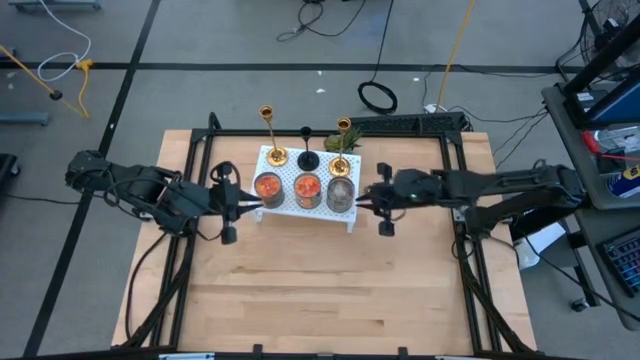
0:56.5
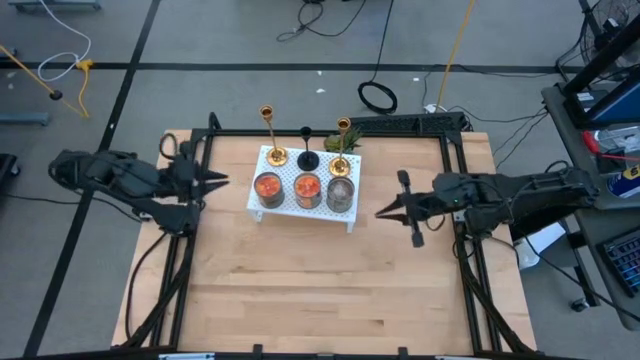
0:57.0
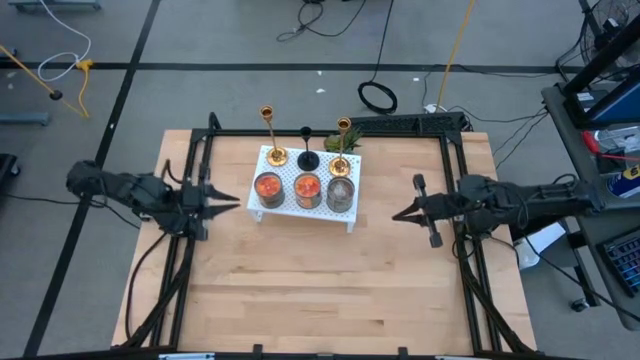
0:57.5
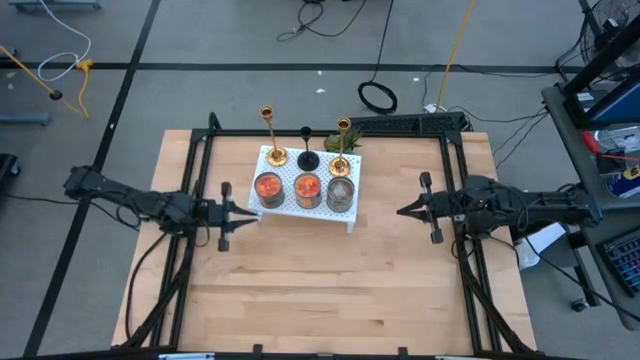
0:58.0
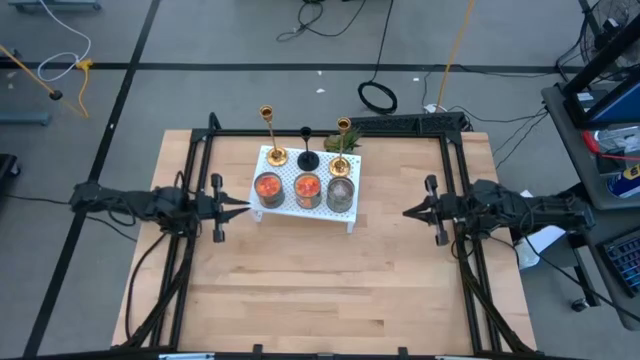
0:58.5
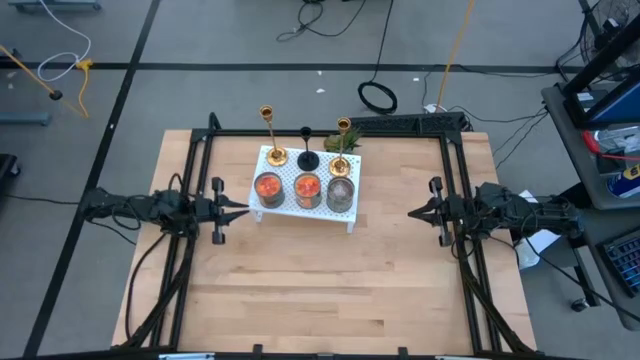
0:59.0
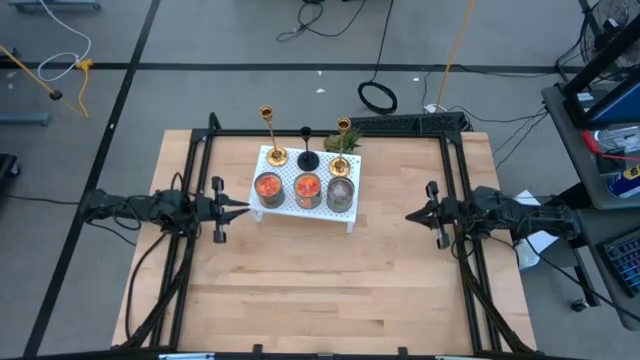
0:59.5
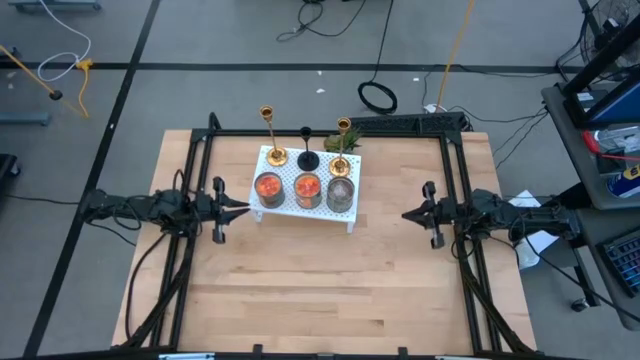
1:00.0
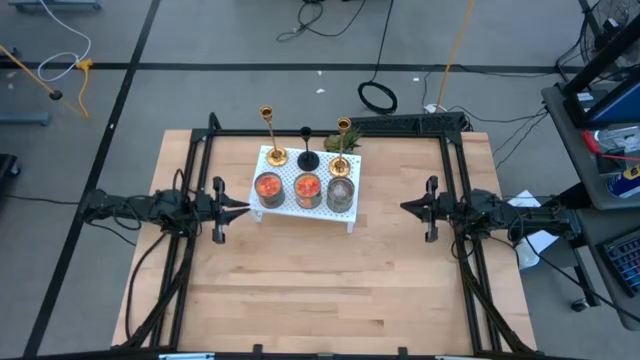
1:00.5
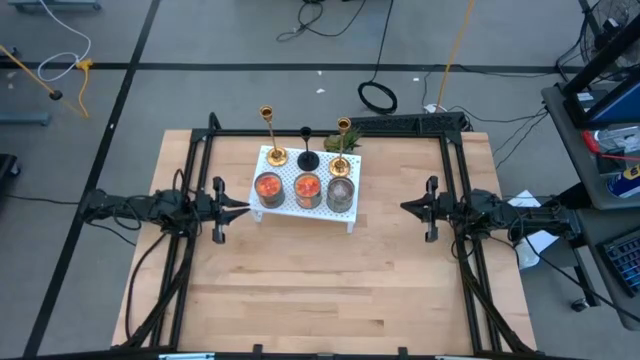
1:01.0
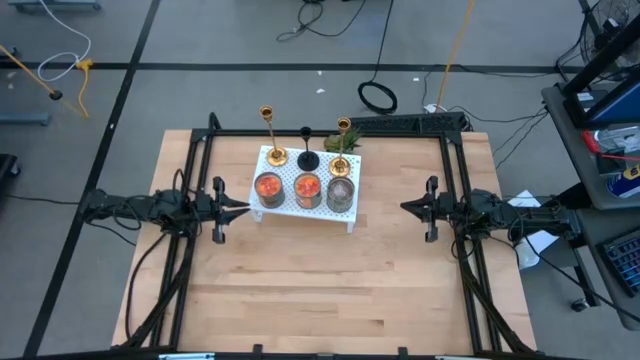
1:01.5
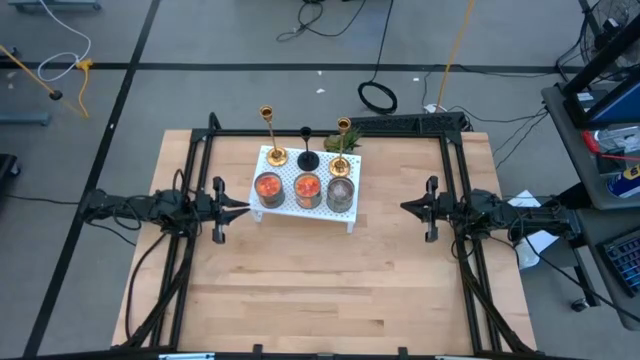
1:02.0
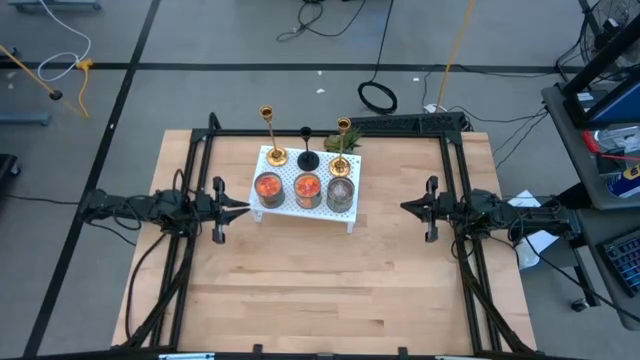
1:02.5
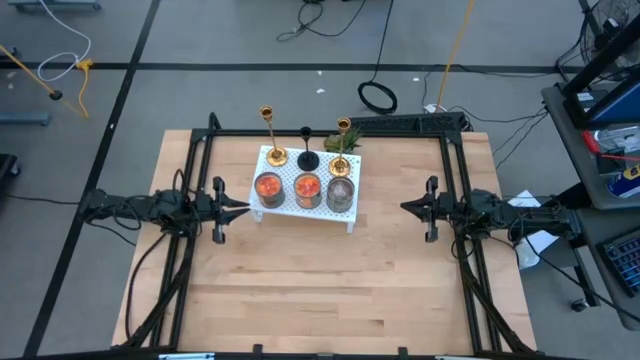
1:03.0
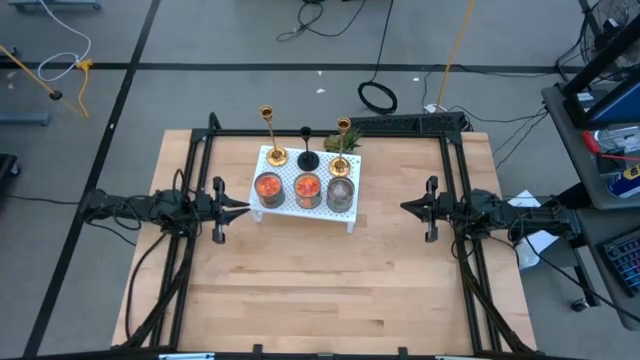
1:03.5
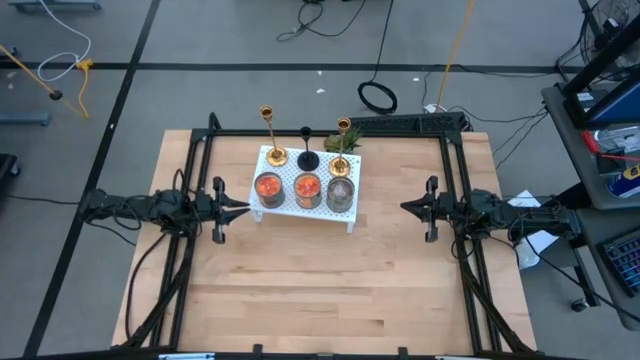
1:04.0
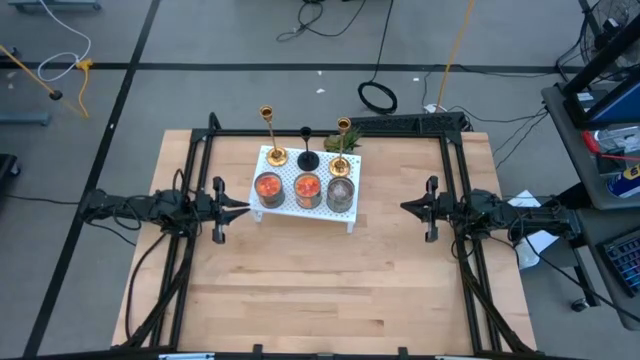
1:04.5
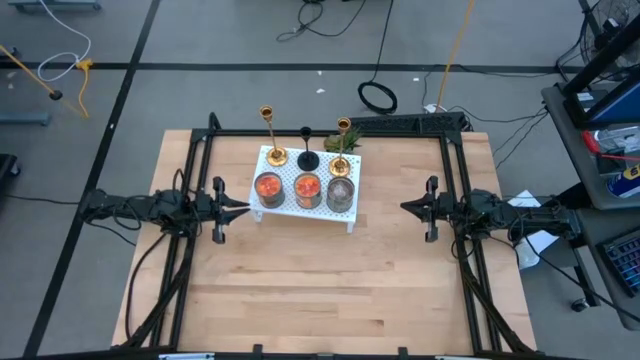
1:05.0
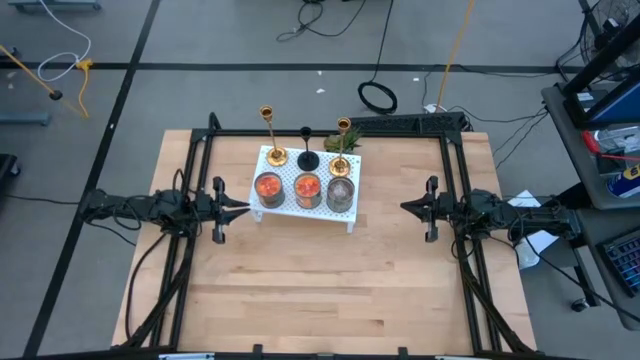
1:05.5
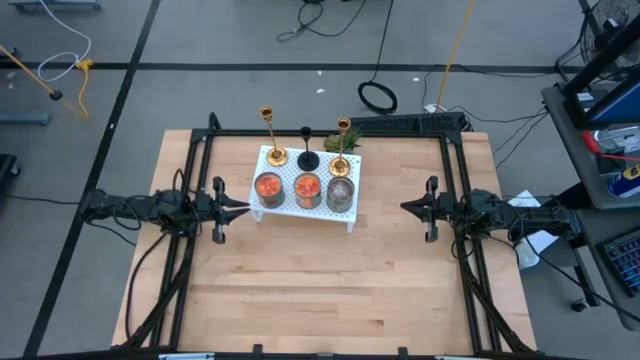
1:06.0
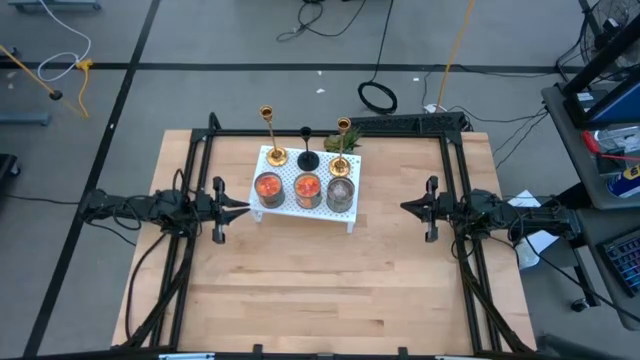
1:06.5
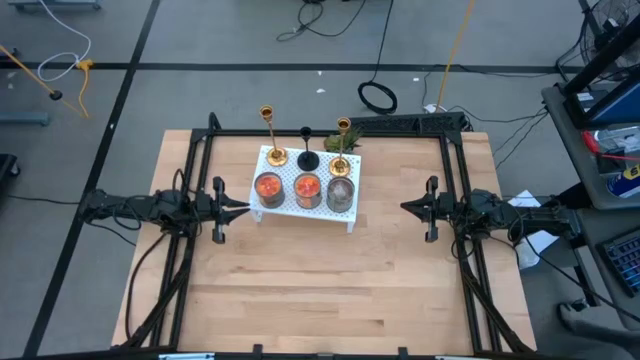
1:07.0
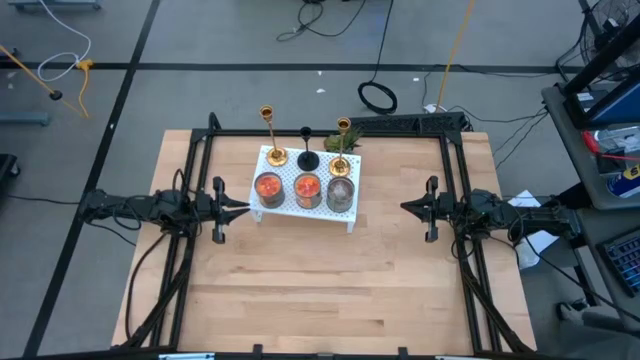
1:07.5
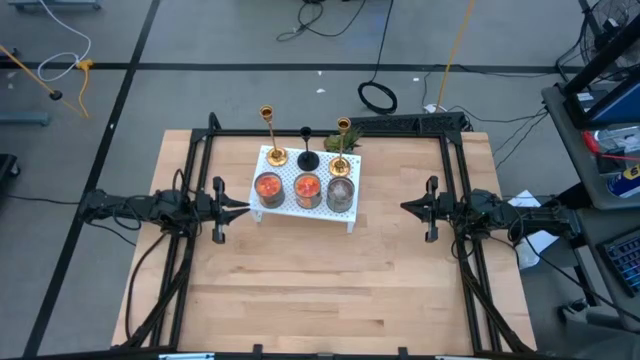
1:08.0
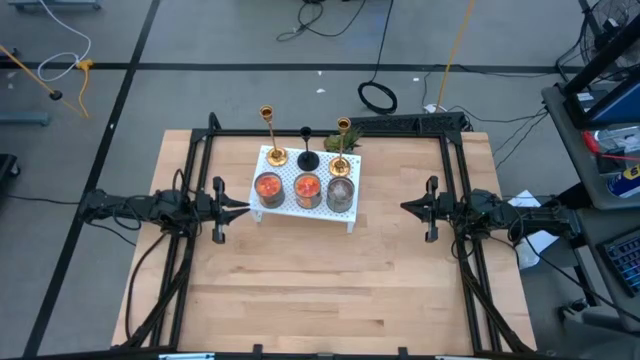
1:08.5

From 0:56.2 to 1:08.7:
Task: Pick & Place candle stick holders
Return to Home Position

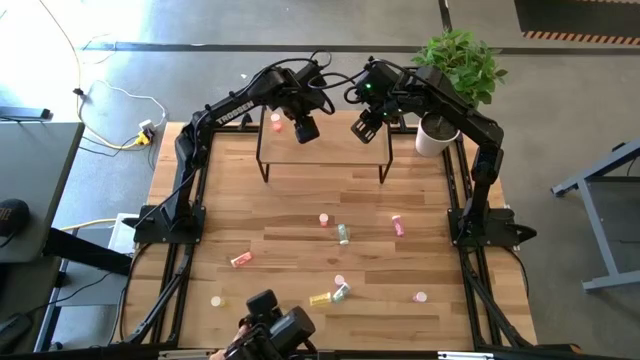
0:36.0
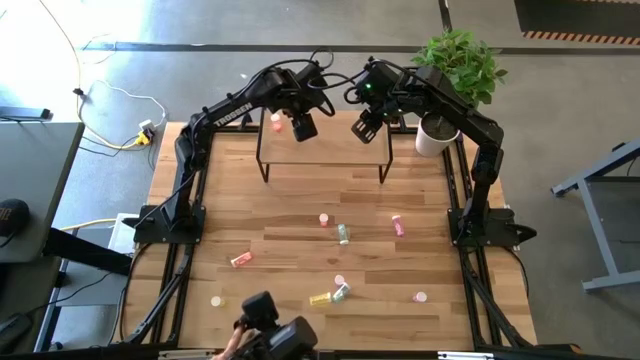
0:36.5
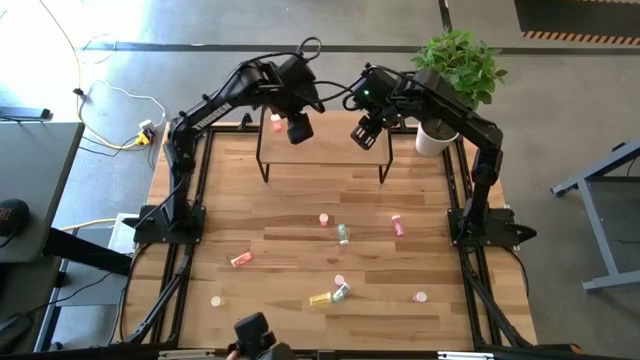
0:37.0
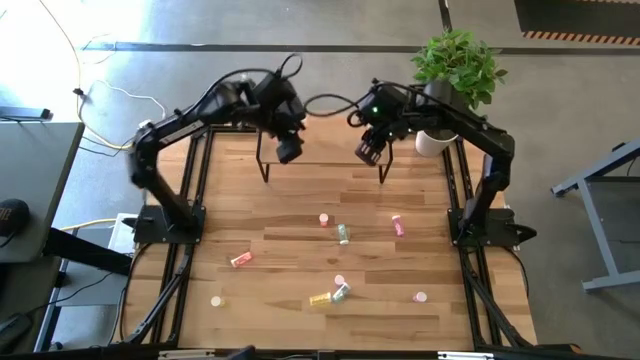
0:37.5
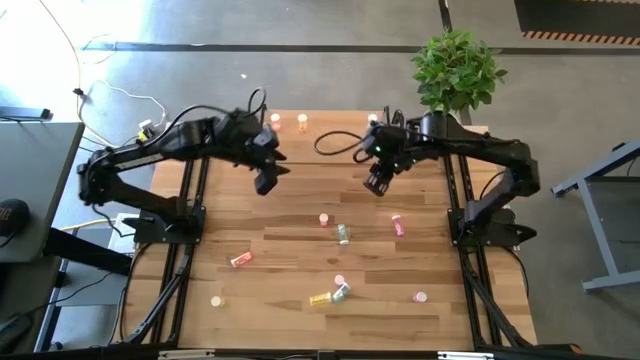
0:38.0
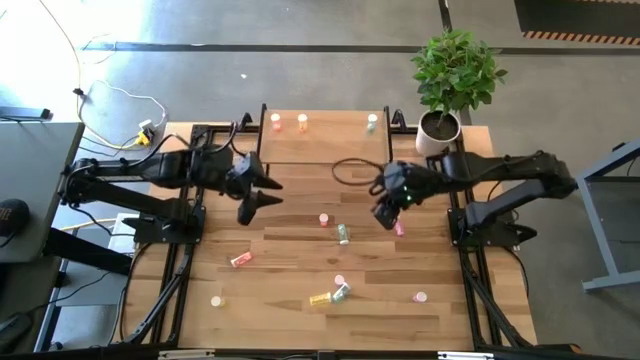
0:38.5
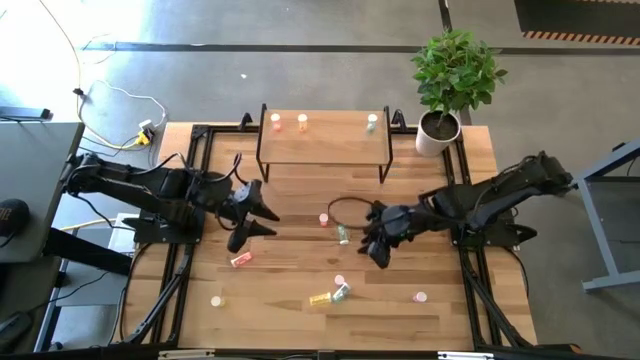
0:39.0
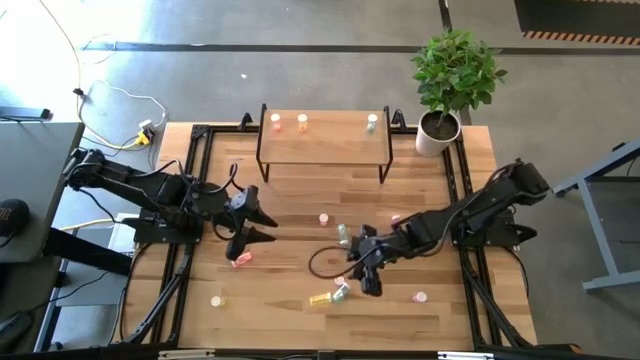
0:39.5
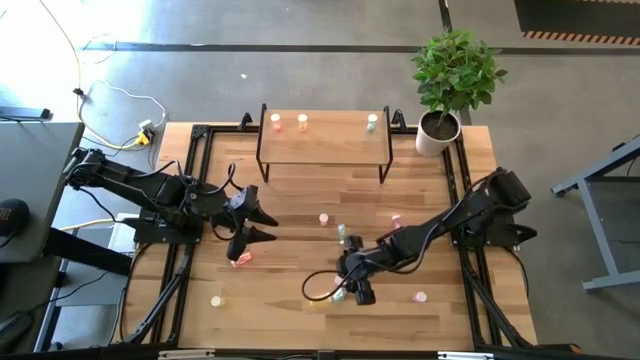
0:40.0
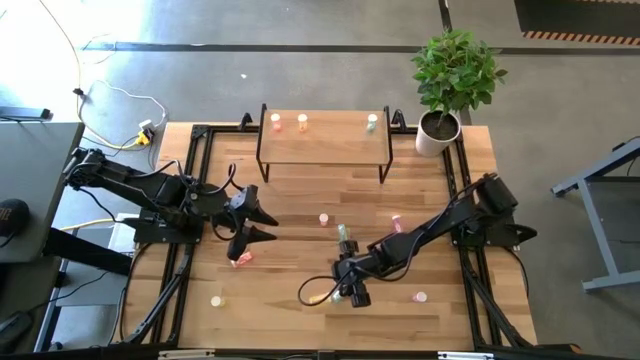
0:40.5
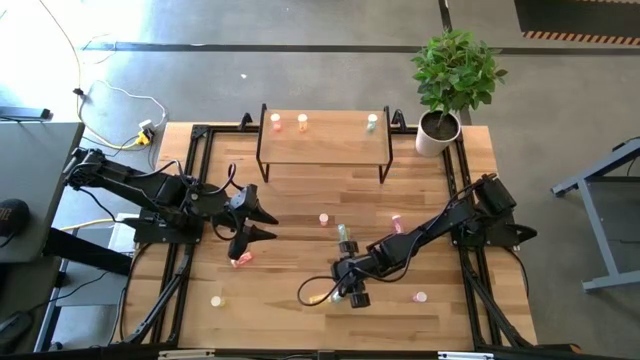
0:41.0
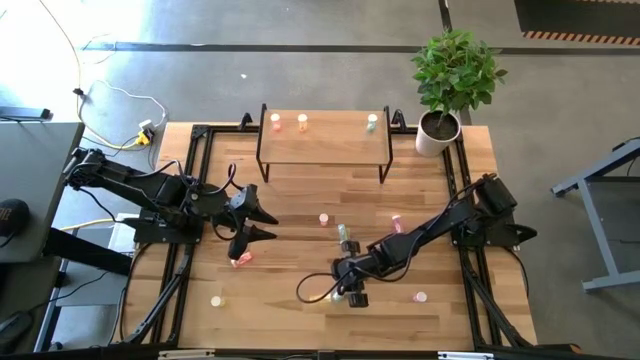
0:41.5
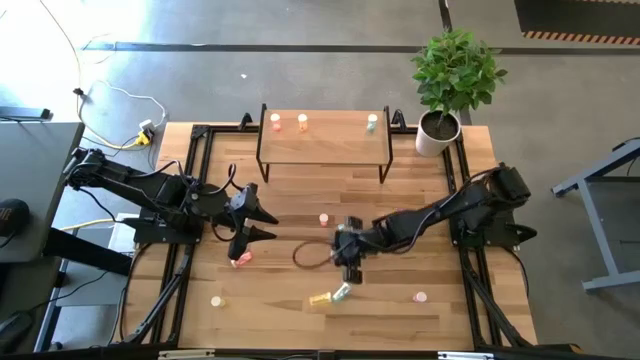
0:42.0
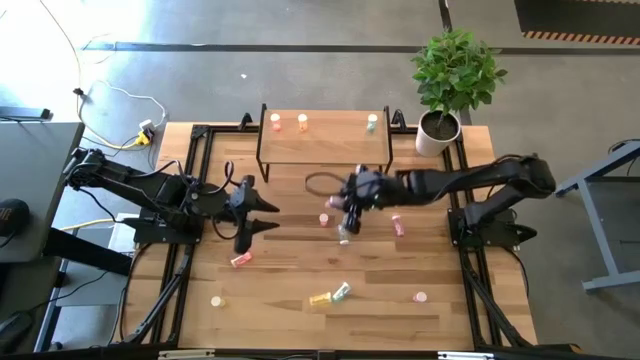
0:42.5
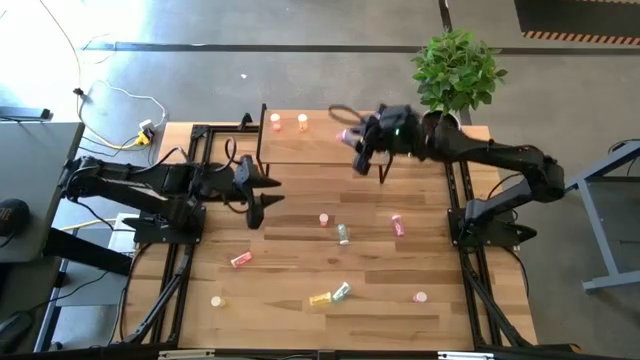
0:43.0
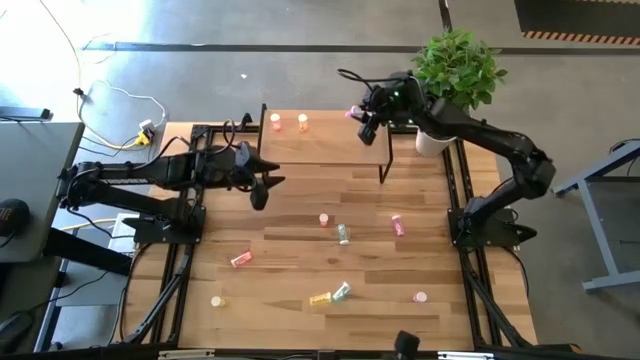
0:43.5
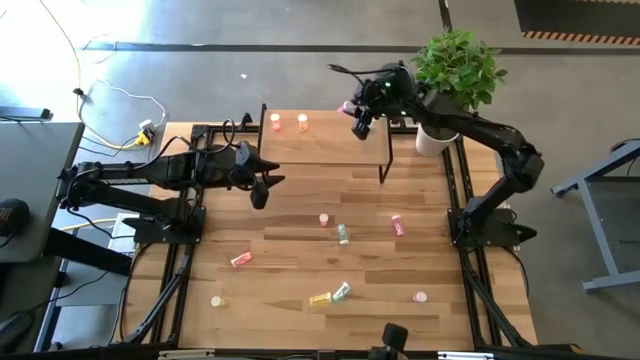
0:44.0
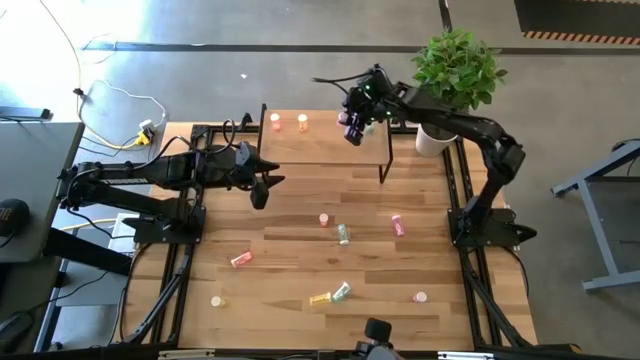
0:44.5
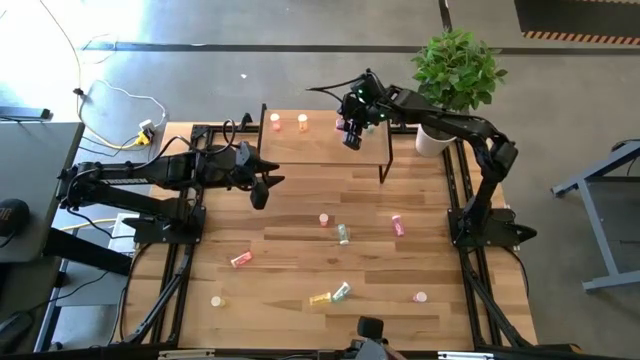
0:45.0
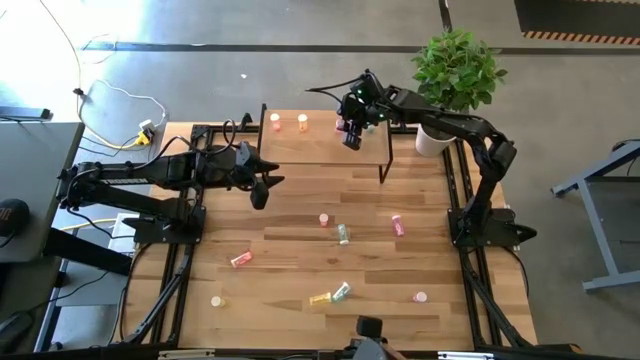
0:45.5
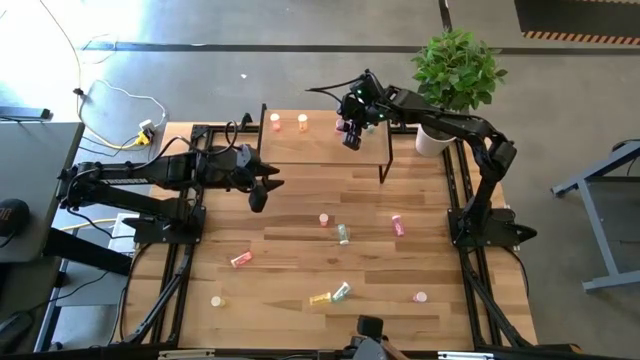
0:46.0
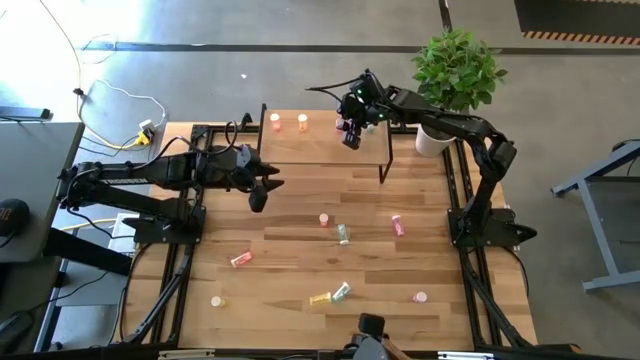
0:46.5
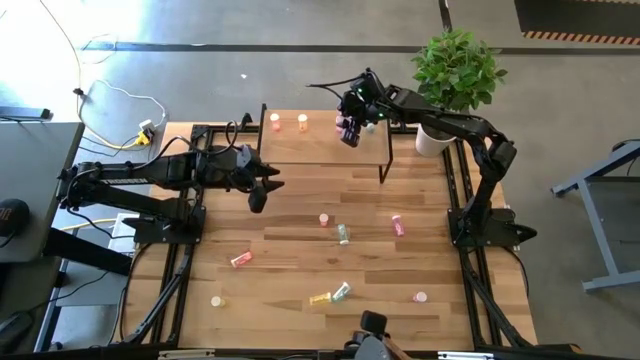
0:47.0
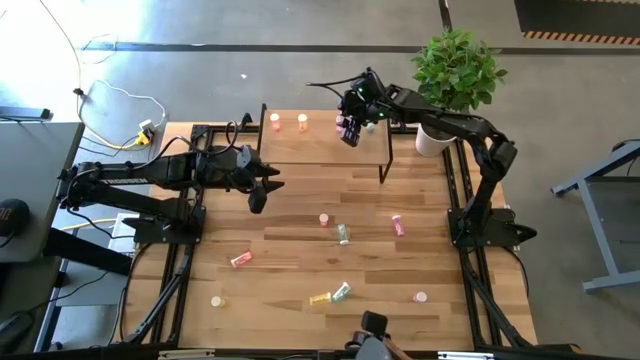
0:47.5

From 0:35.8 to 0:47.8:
Task: Pick and place medicine bottles onto shelf by color
Put the bottom left violet pill bottle on the shelf
